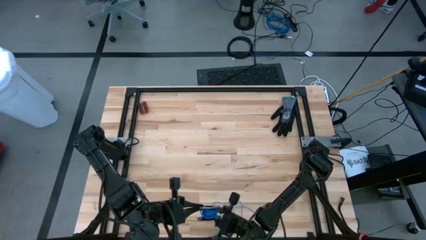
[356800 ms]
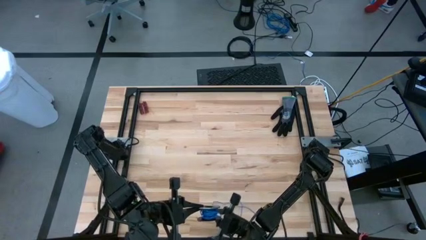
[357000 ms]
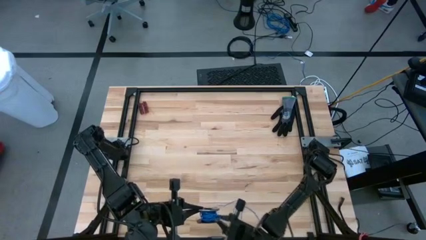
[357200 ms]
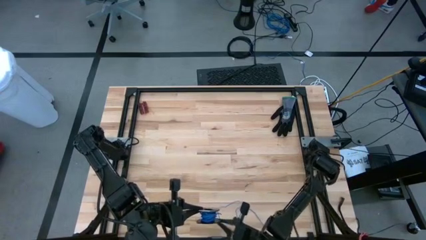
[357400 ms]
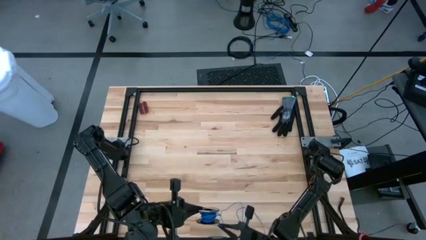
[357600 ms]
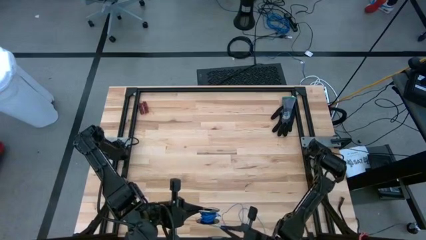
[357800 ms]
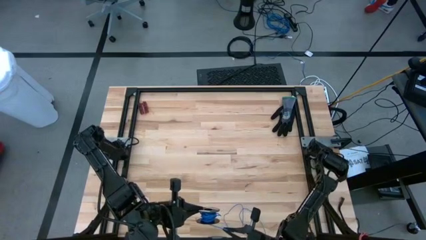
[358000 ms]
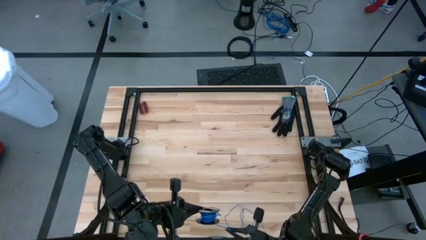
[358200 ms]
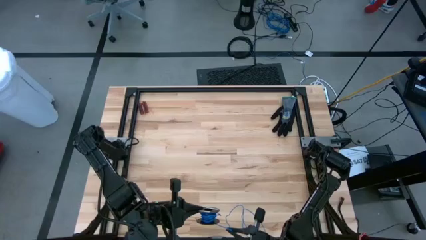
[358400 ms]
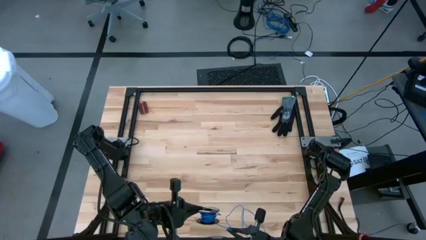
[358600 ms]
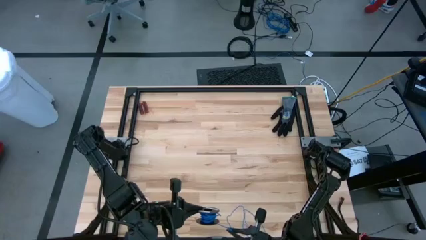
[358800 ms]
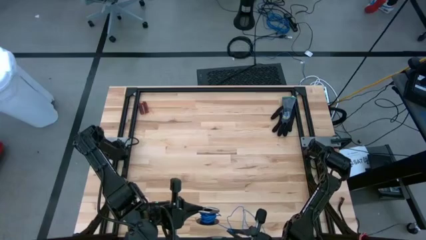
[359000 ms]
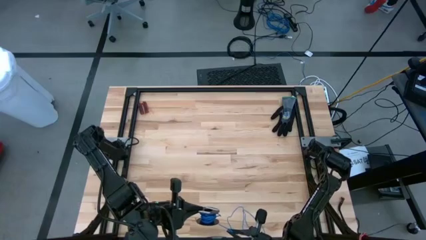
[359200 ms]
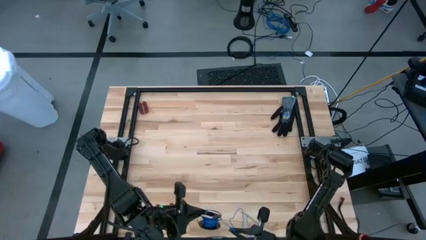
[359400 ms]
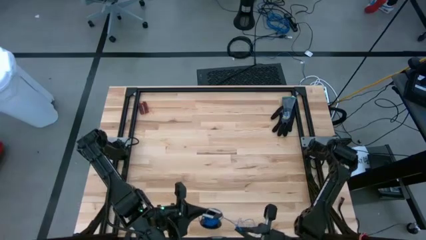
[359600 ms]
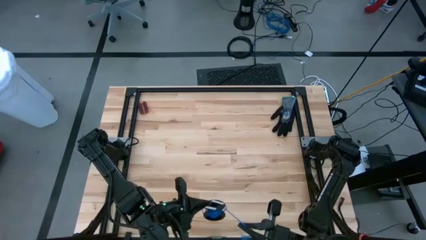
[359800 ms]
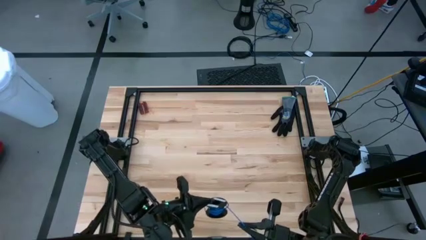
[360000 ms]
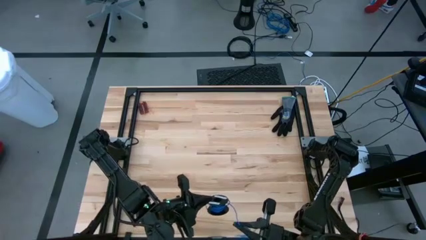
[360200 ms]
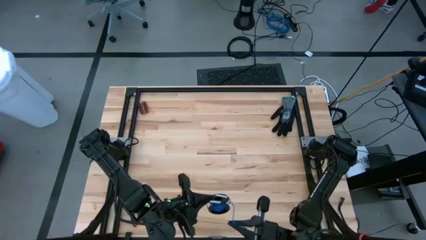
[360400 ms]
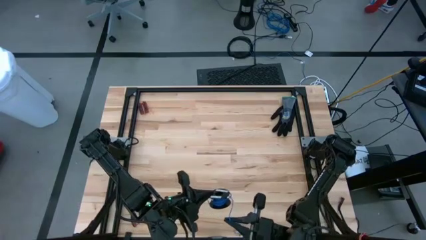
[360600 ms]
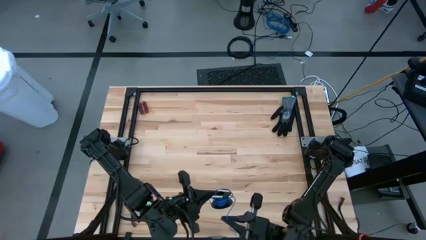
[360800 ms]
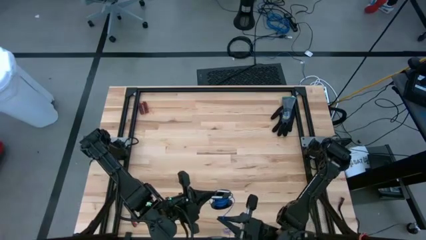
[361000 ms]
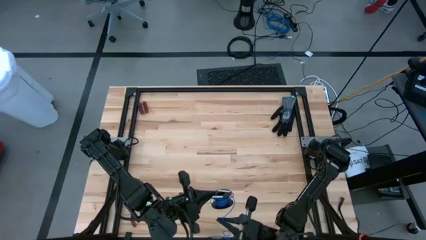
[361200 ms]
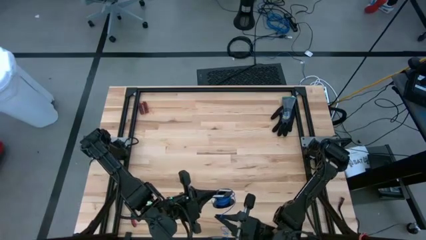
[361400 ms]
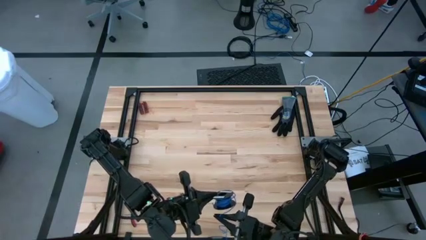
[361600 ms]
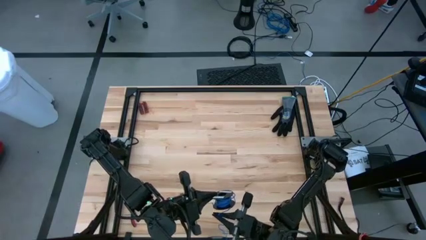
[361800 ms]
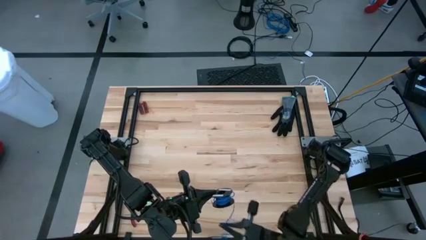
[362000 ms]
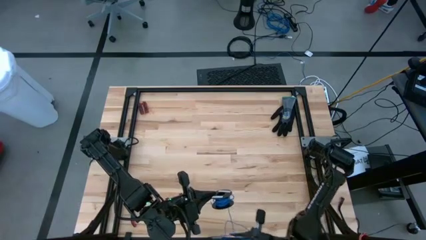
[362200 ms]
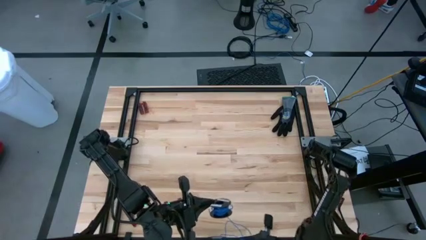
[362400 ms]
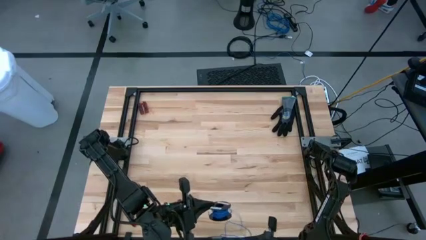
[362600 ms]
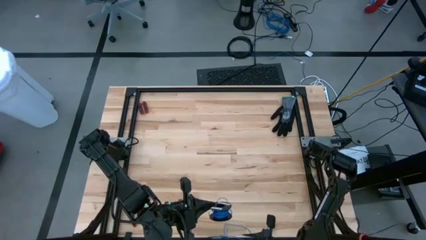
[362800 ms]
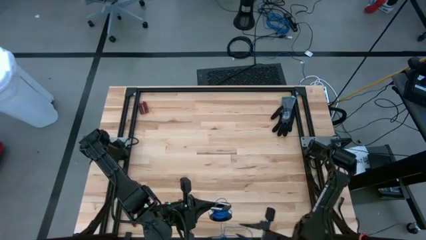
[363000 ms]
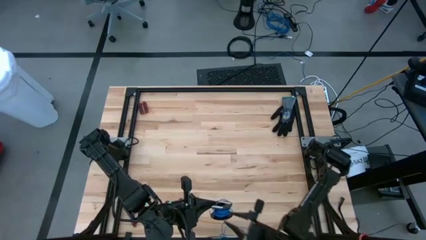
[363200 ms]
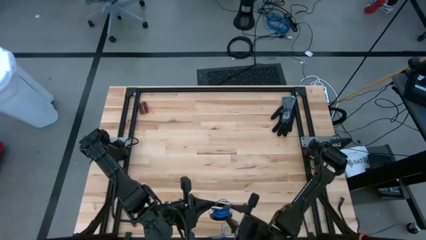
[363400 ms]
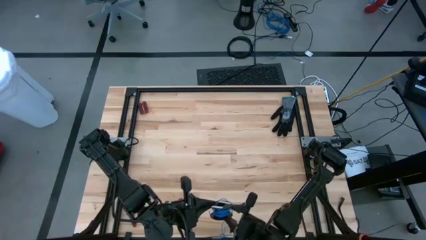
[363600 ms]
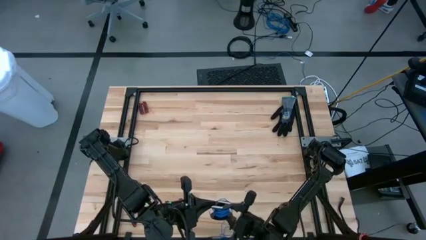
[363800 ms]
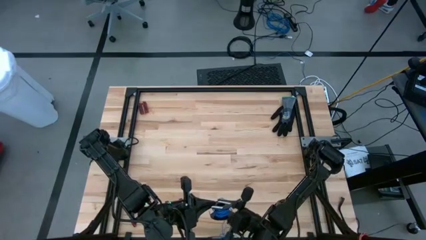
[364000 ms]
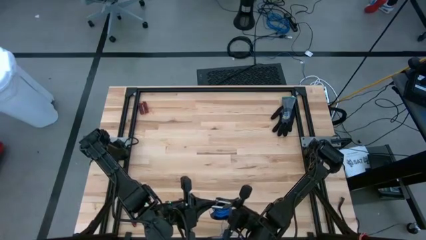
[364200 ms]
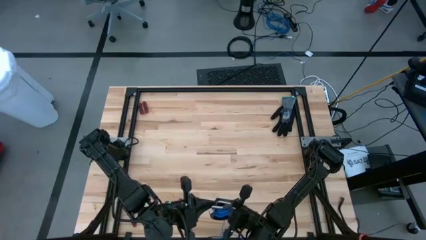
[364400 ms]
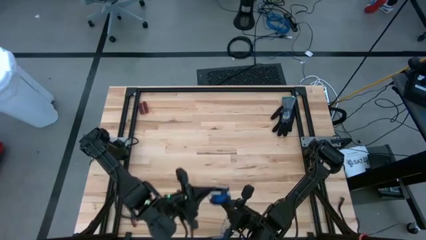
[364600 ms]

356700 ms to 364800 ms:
Task: Coil cords
Coil the blue wire onto a spool

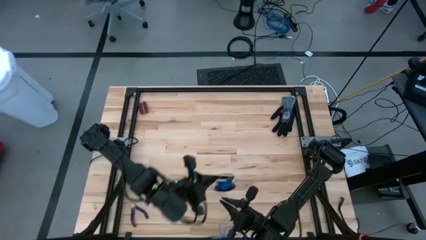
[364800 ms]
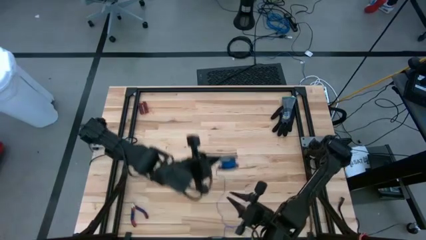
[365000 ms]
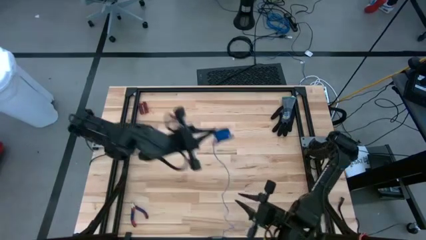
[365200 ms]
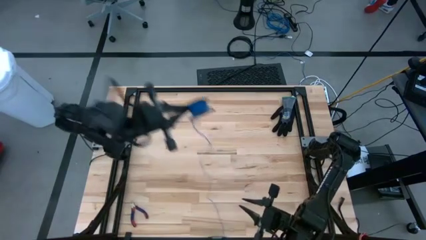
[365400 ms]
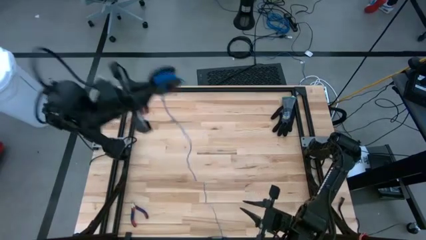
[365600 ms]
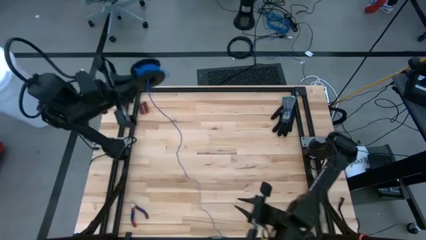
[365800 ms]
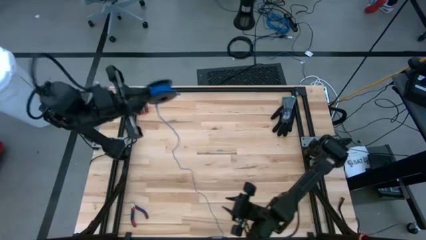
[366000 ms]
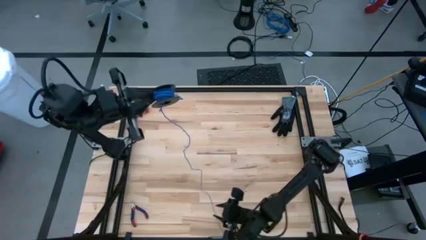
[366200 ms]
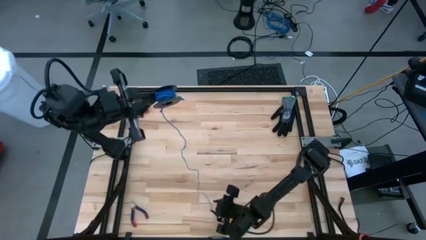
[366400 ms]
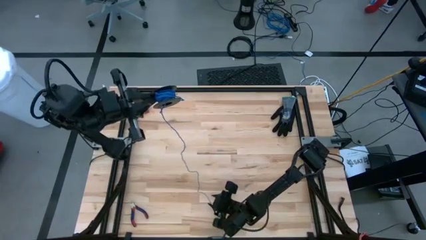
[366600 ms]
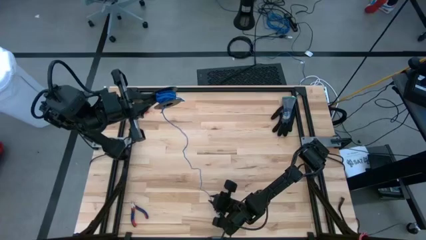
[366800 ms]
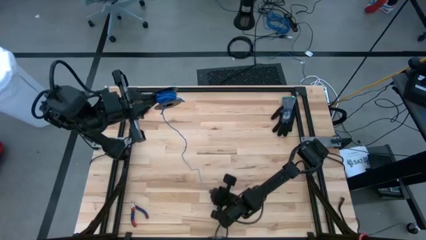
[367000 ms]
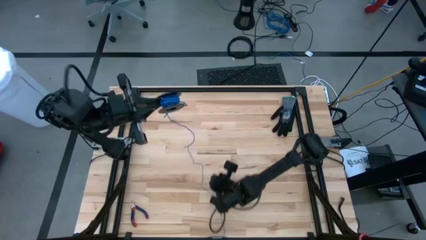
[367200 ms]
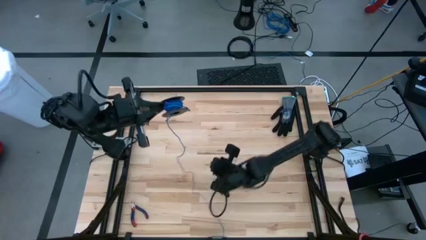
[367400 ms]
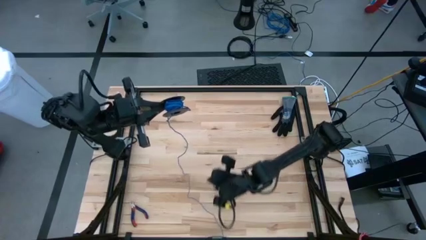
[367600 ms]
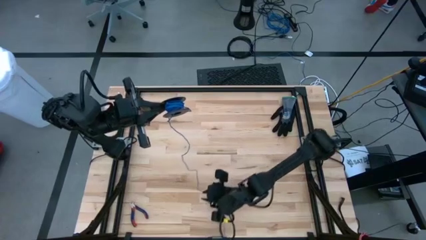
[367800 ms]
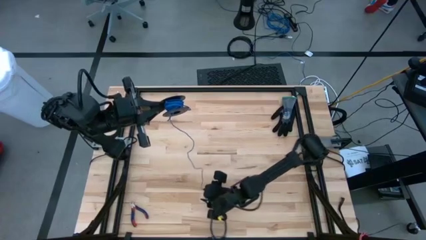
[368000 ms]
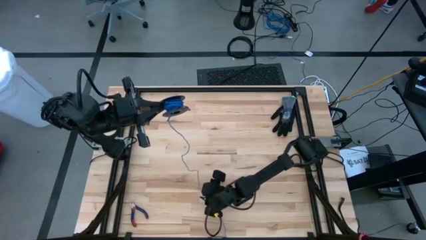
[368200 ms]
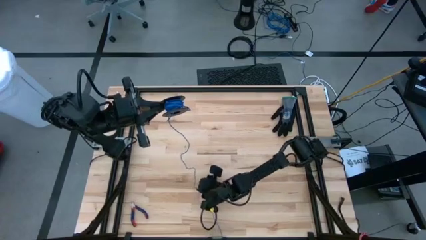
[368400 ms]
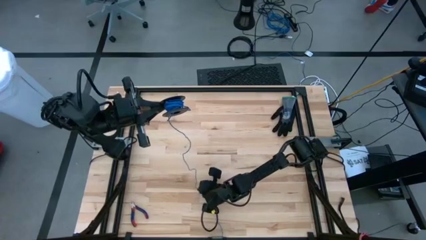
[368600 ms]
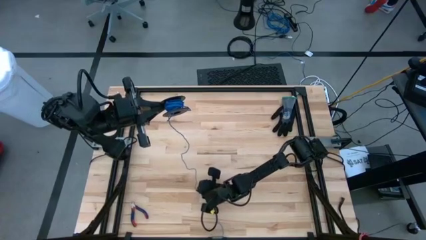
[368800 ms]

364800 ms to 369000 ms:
Coil the blue wire onto a spool

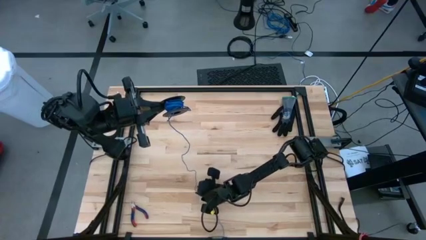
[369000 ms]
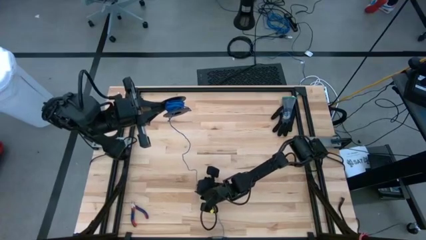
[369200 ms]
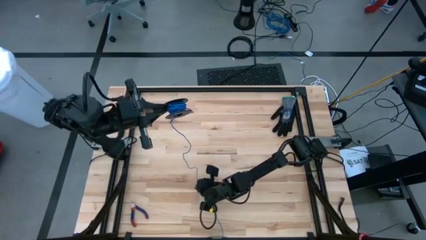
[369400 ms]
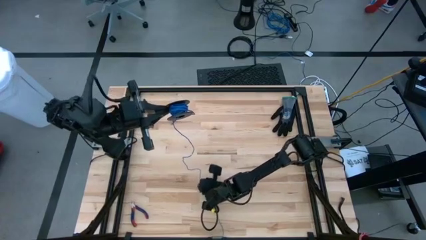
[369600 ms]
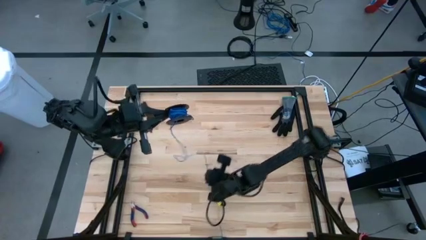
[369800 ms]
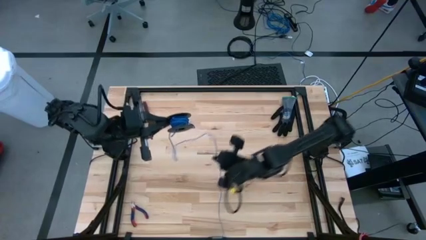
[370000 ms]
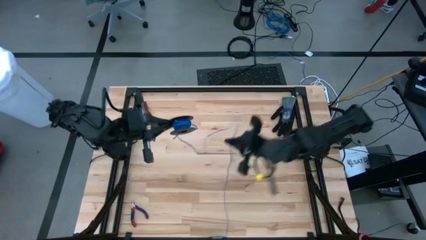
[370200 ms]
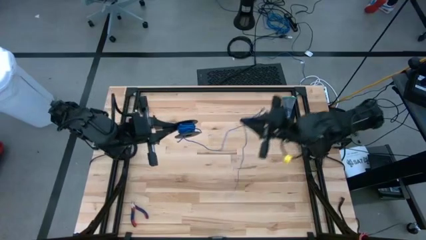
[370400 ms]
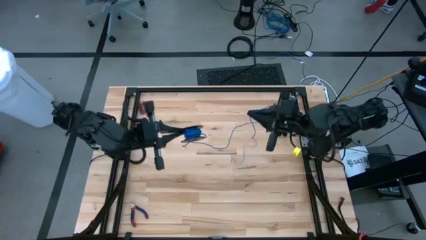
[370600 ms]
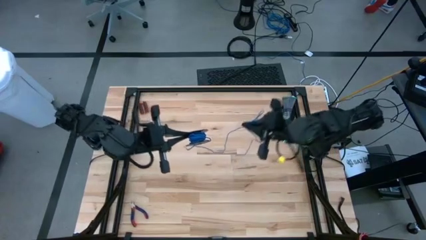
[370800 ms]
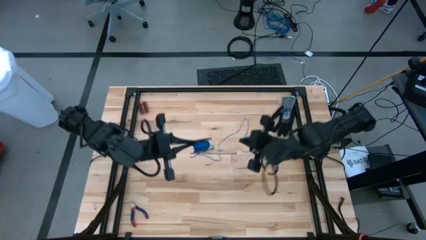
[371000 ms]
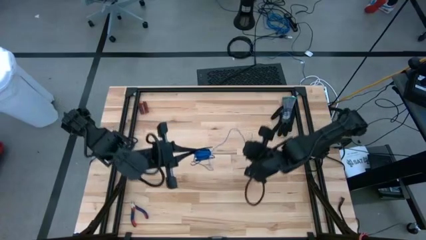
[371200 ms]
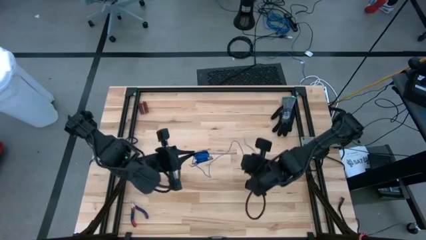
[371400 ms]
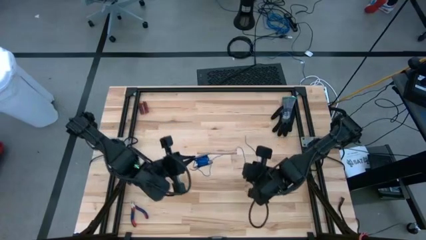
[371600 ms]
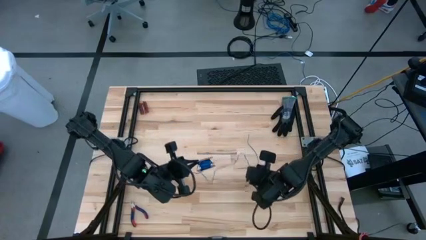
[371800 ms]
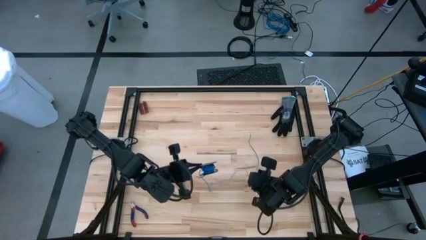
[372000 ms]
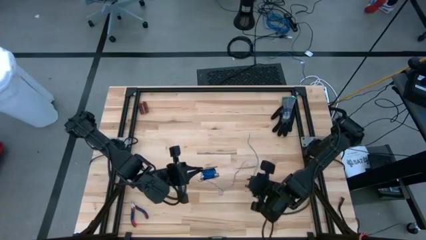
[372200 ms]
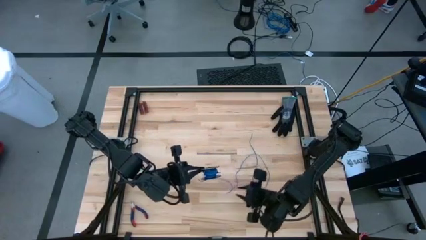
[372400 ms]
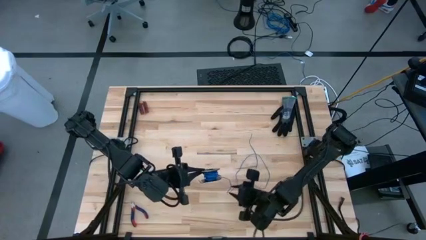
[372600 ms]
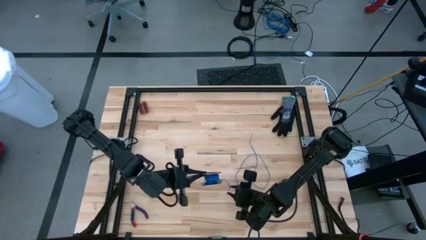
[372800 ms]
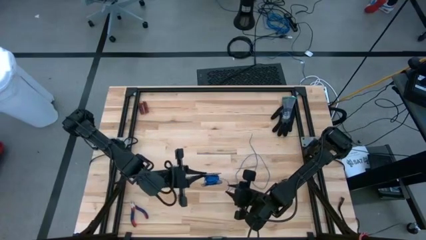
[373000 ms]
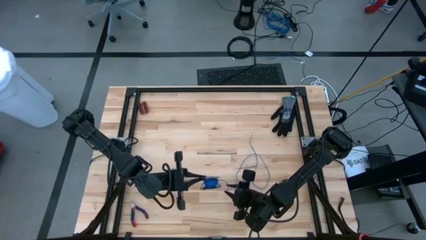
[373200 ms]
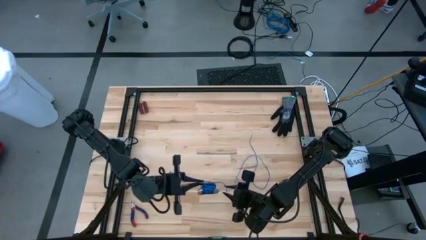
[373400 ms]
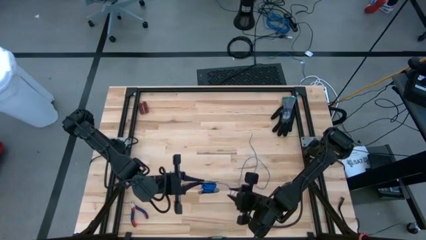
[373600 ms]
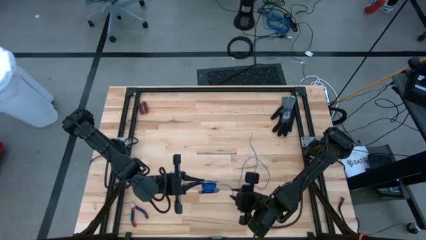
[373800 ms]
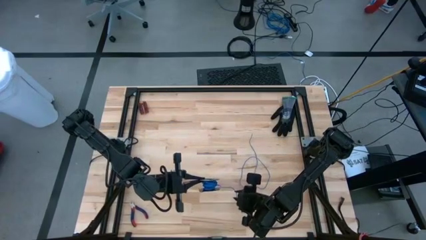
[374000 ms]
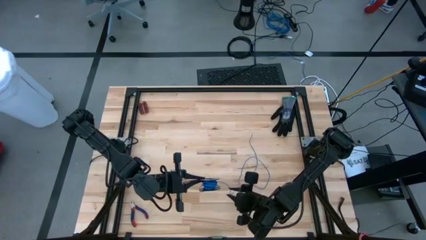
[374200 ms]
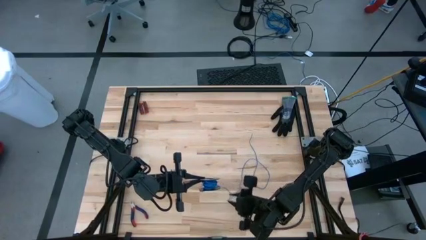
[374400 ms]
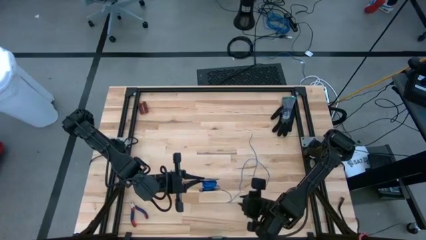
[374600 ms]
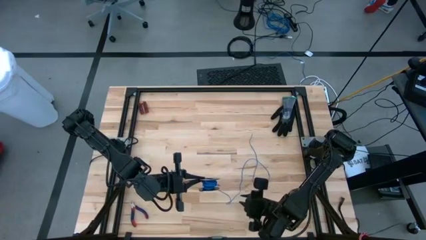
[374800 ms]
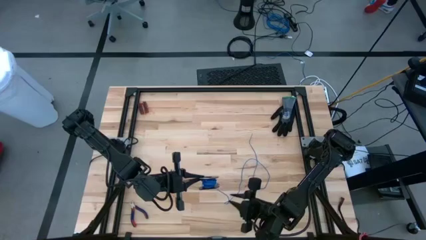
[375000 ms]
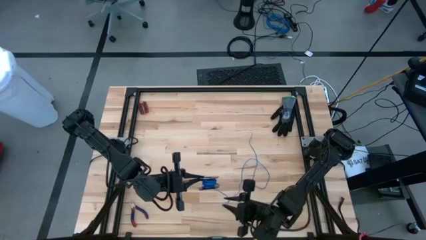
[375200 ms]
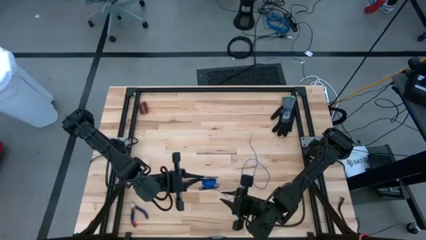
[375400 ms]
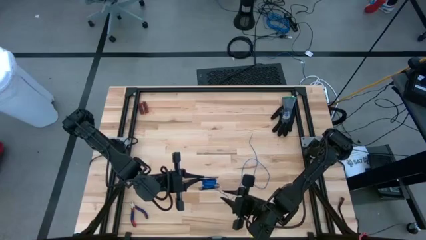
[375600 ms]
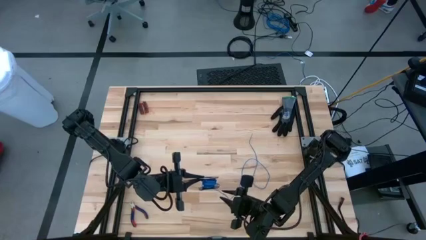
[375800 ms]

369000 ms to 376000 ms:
Coil the blue wire onto a spool
